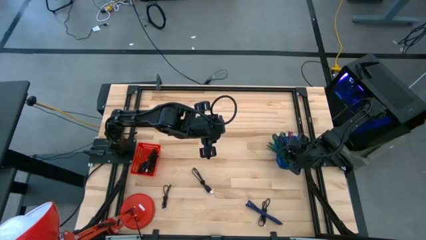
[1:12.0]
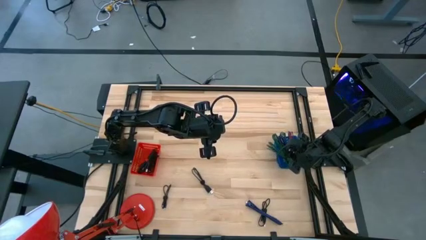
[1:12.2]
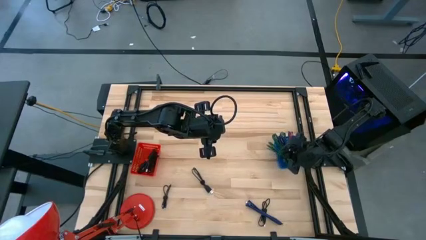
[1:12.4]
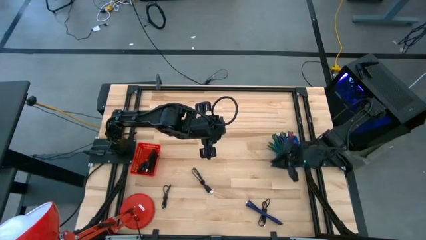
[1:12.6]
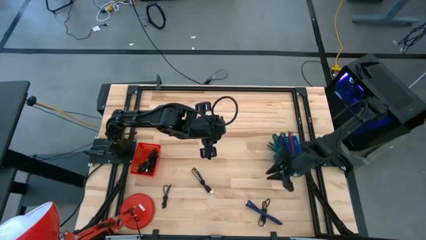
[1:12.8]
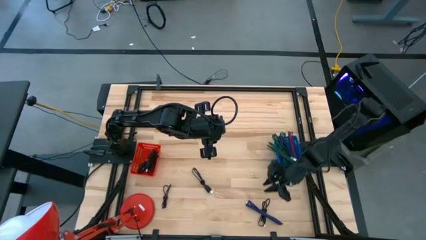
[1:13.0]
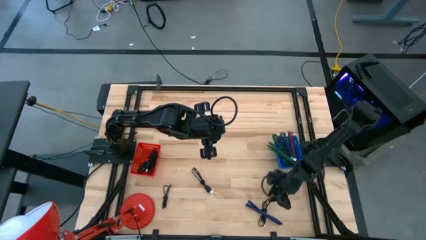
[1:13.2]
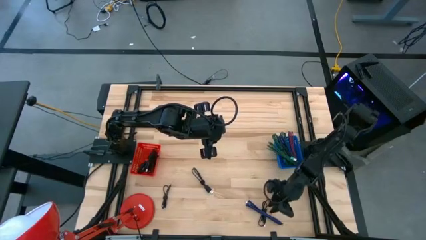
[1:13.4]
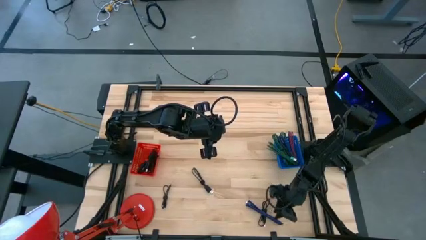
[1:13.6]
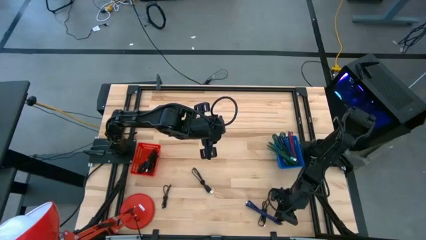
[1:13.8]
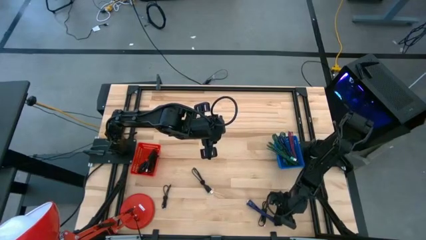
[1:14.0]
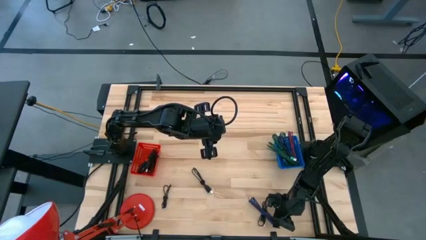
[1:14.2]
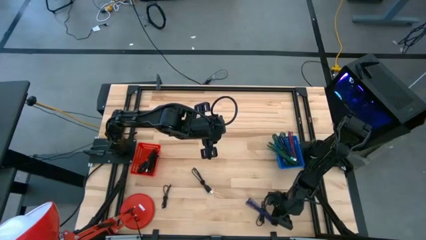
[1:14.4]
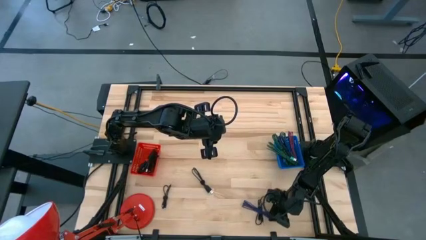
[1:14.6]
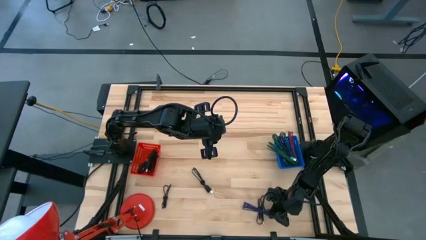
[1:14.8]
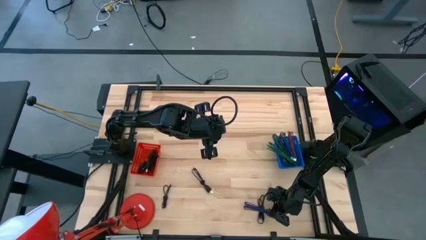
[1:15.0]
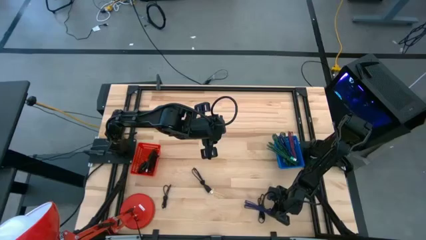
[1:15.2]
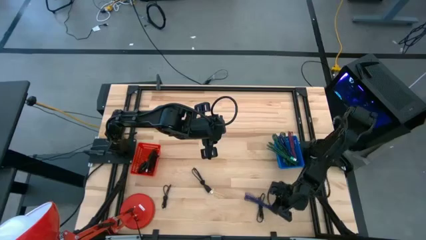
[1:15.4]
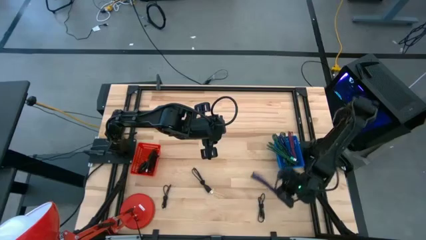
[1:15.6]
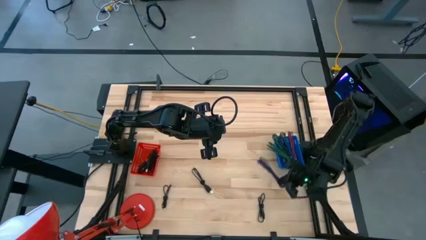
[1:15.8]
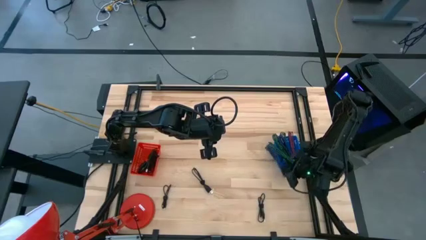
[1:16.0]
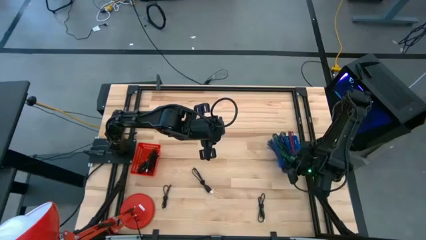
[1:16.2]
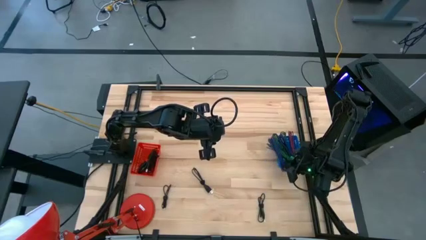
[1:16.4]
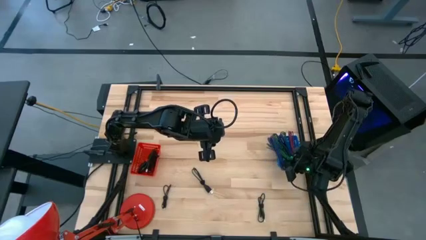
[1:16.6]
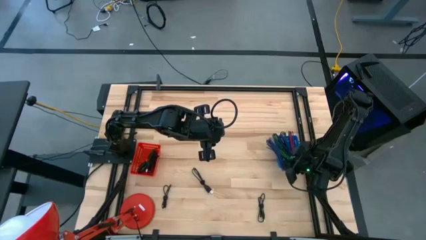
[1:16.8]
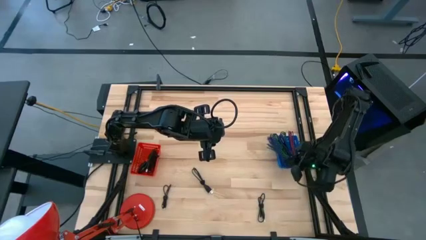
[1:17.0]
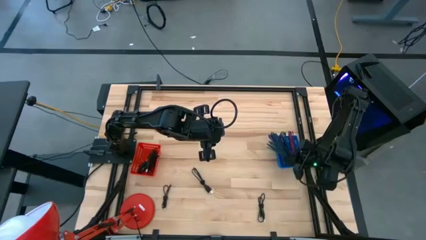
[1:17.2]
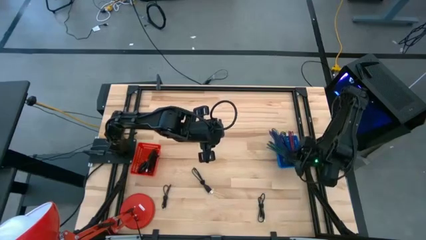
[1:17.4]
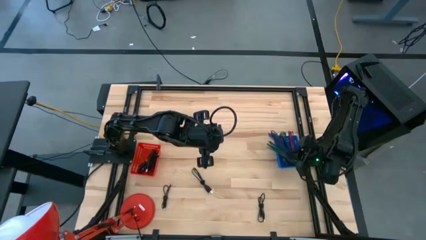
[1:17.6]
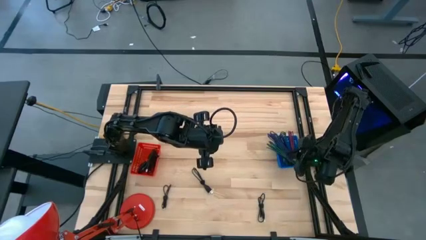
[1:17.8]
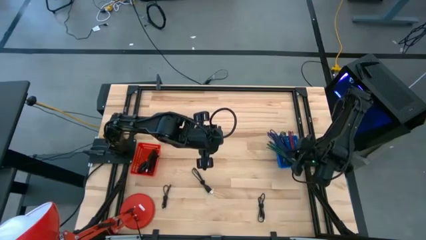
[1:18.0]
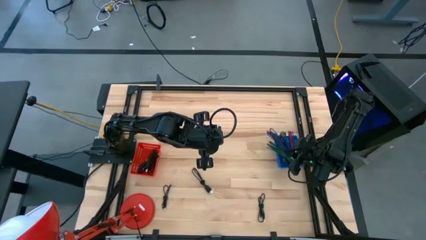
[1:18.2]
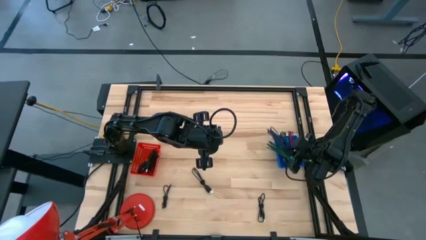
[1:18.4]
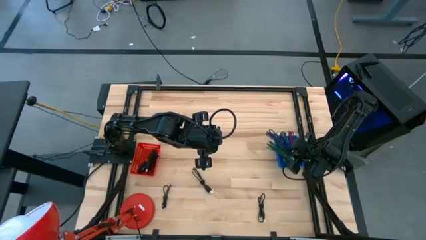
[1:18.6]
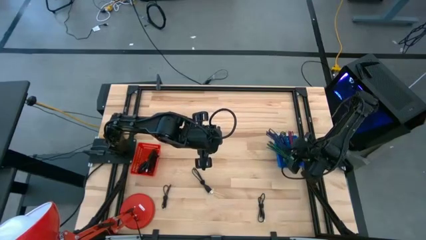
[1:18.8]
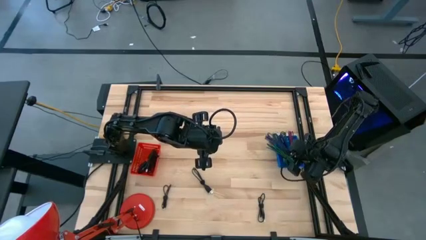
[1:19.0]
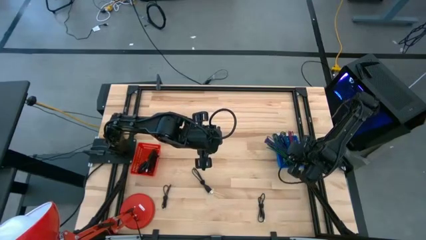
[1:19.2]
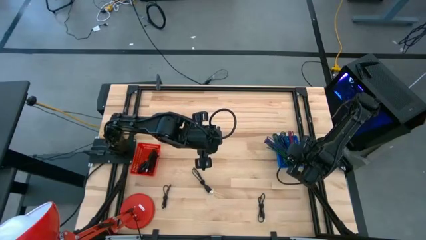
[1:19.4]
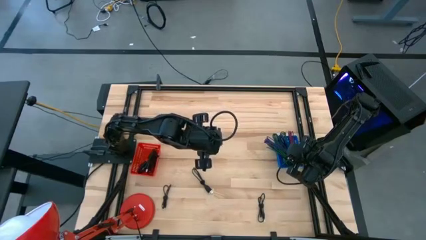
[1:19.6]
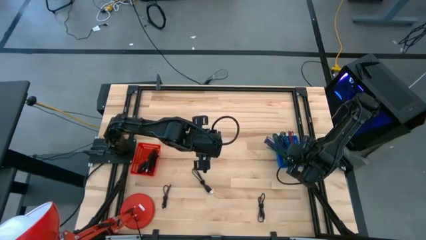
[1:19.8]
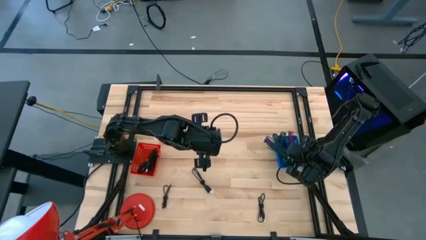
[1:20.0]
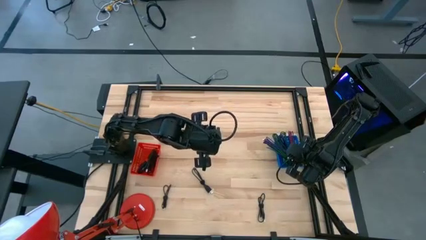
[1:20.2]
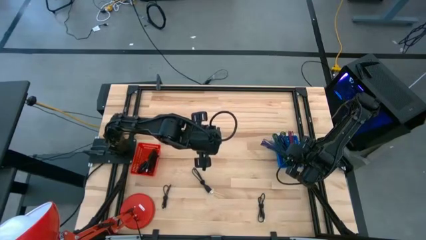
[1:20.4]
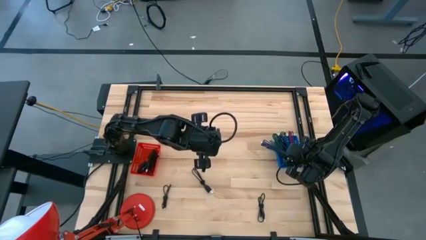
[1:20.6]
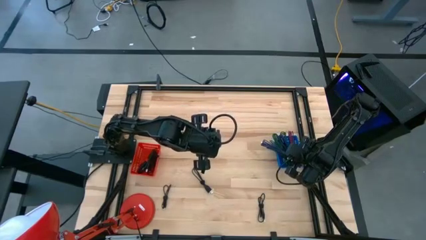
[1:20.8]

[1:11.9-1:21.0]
Task: Pick & Place USB Port
Put the blue charger cable into the blue bin

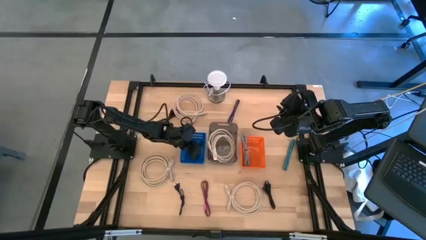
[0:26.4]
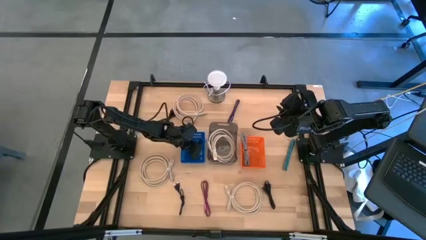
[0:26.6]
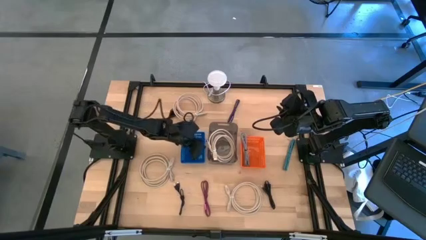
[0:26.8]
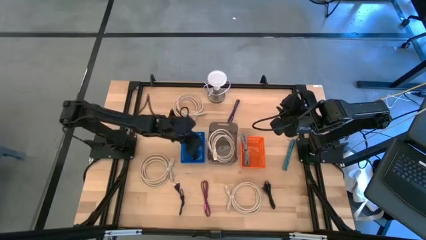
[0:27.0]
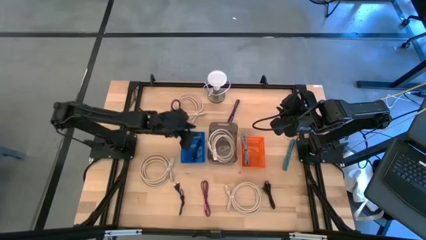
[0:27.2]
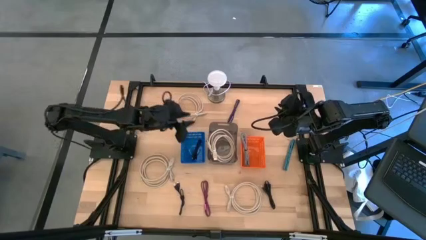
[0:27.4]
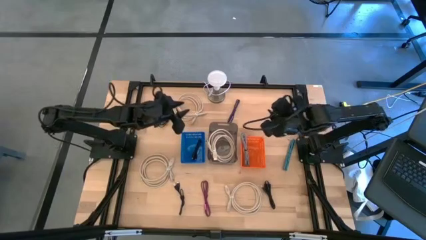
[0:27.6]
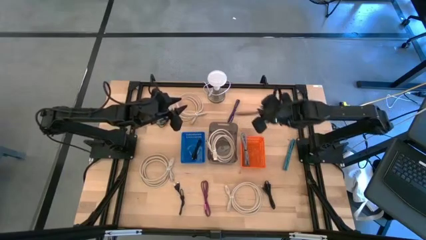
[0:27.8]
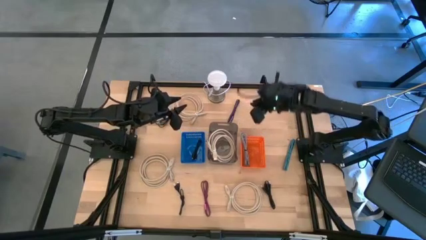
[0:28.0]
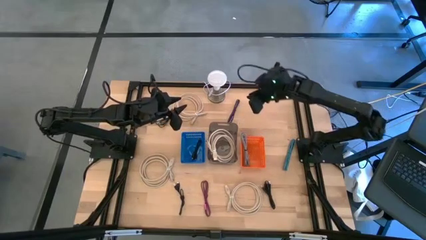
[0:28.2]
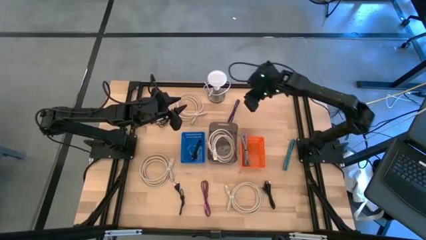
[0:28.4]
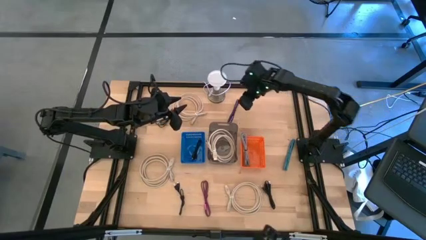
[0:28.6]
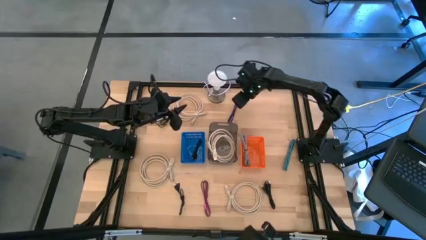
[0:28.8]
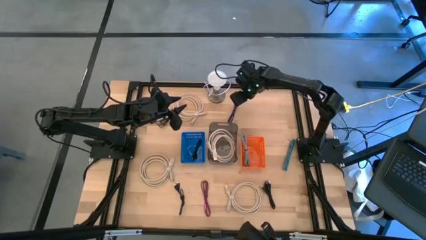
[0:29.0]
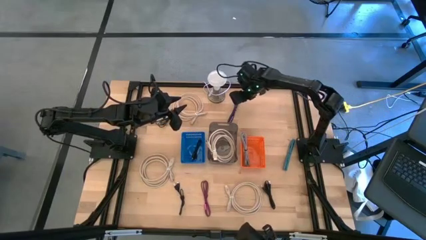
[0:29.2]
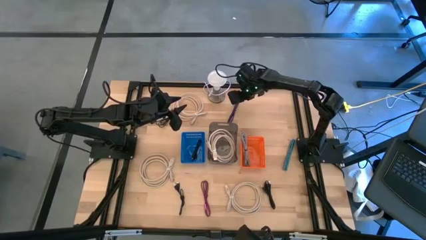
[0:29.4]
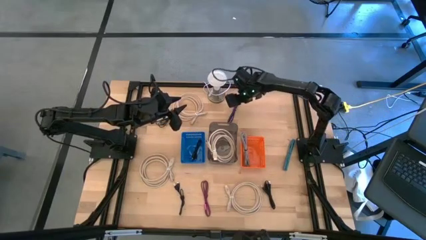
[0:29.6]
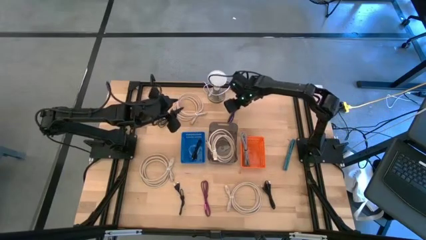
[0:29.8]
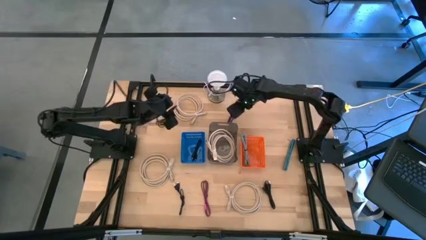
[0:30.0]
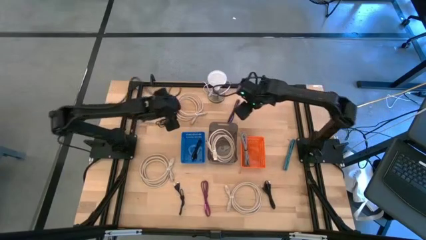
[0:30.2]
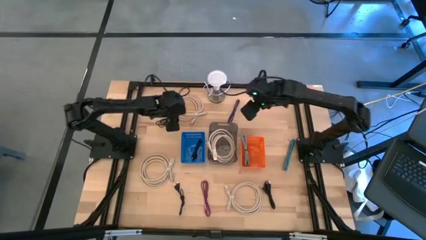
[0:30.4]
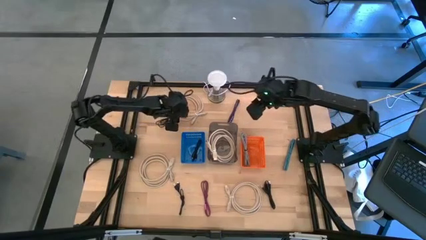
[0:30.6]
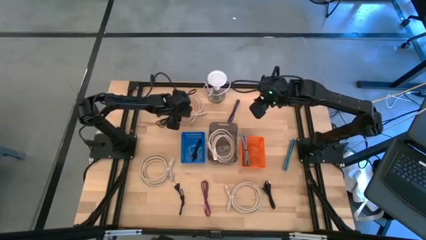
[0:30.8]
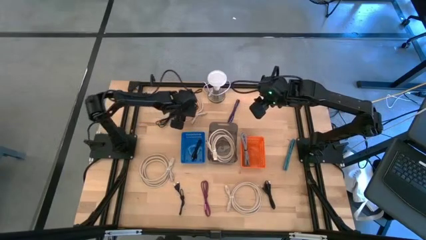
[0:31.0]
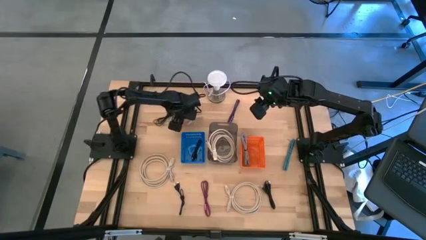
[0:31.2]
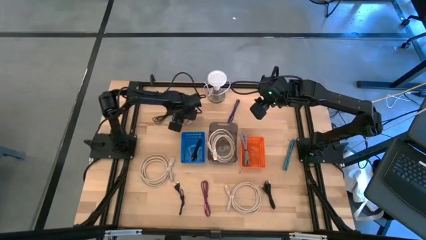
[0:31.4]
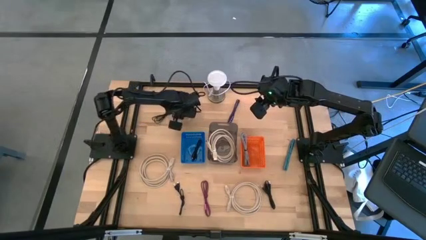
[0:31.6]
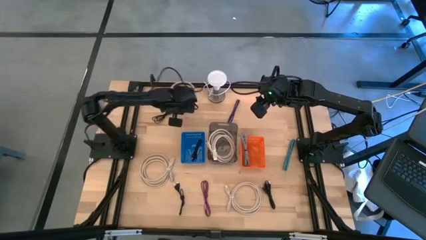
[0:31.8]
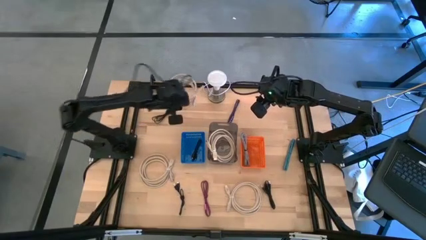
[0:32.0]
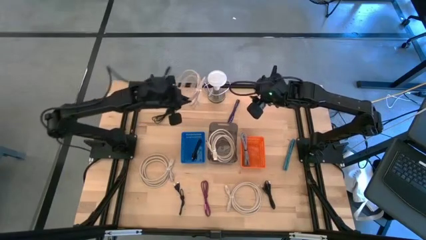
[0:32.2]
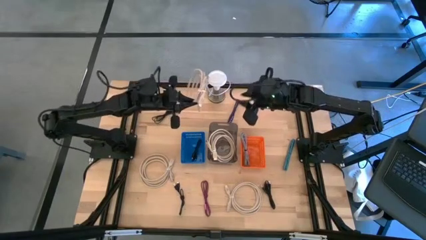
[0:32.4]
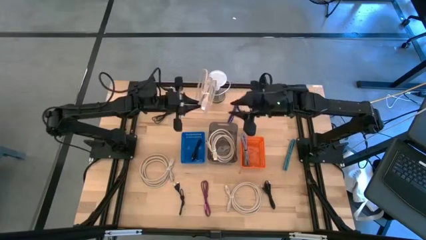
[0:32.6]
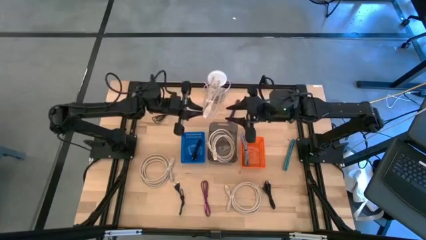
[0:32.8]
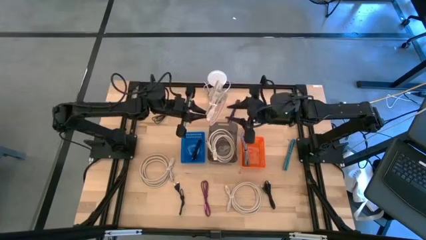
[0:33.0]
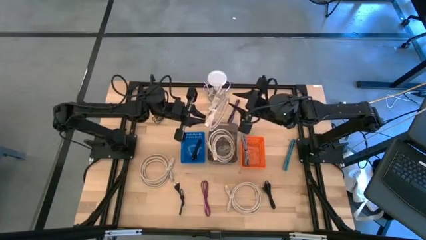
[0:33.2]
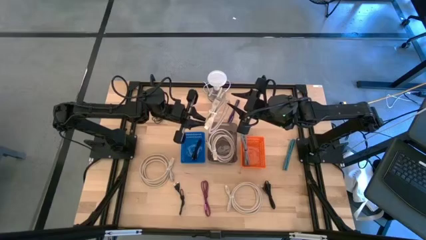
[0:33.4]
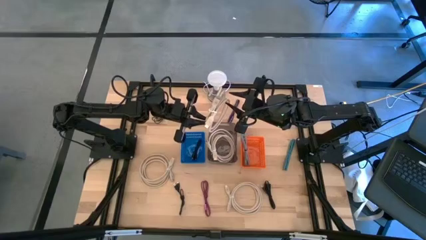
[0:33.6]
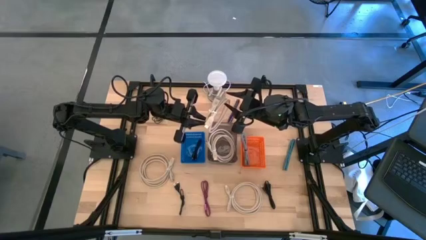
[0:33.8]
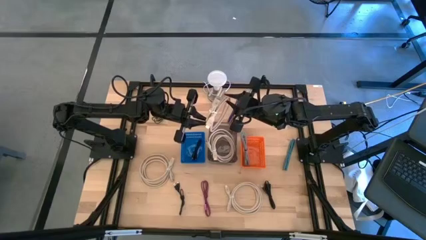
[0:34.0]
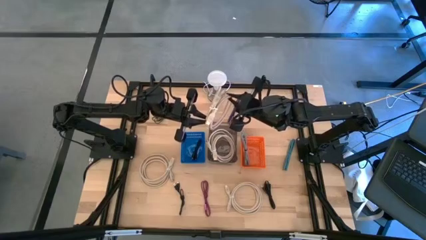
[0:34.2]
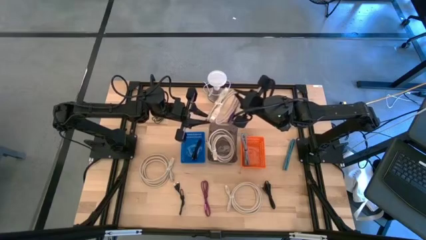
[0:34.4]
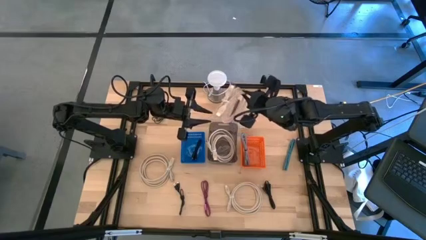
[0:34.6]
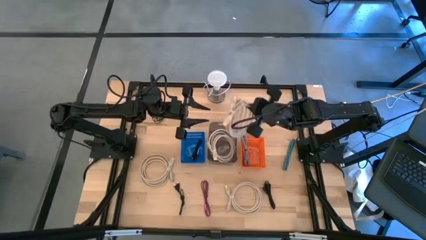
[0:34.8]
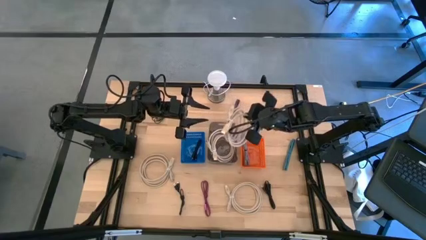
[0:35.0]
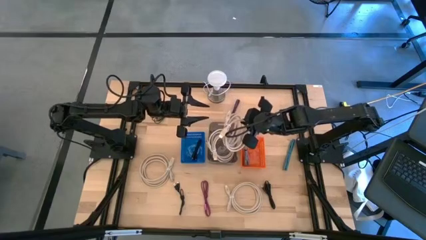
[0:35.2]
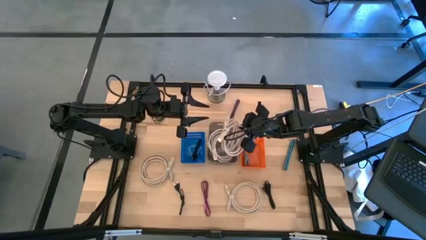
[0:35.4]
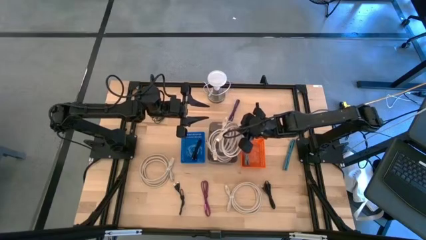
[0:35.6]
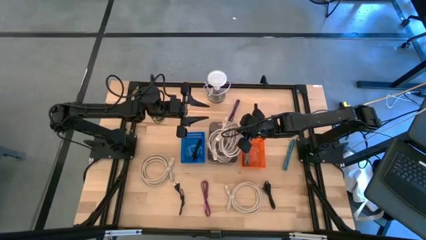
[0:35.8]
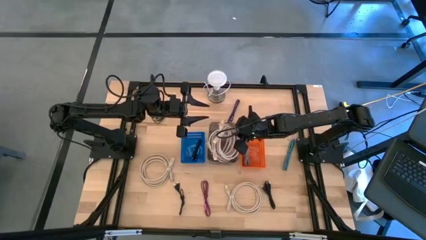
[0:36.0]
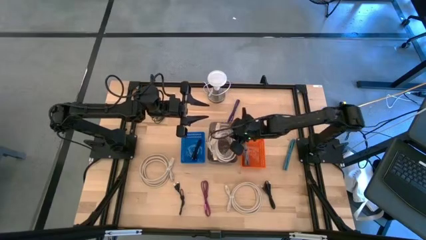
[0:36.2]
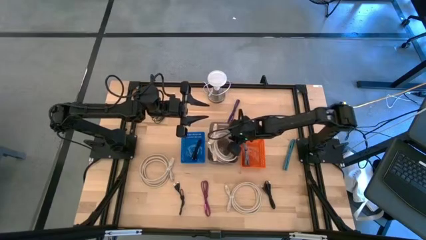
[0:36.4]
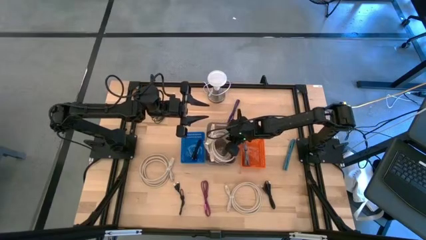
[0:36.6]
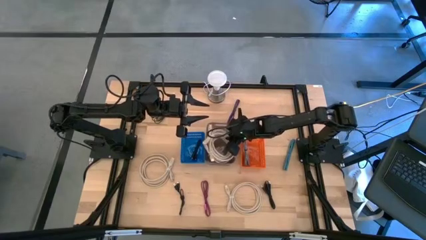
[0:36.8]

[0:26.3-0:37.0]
Task: Pick & Place USB Port
Put the brown HDMI cable into the black bin
